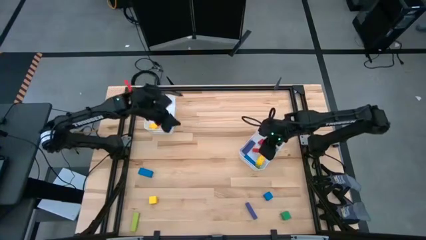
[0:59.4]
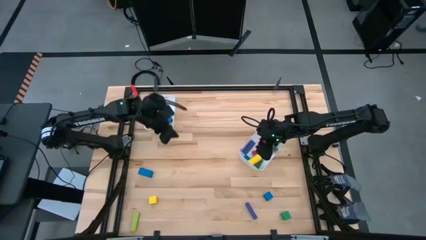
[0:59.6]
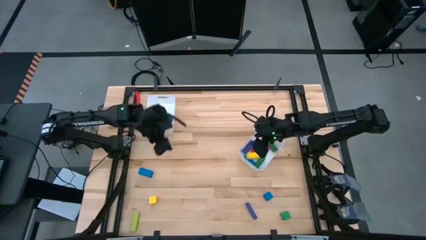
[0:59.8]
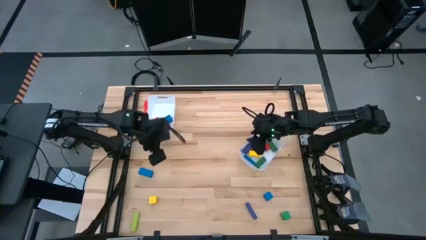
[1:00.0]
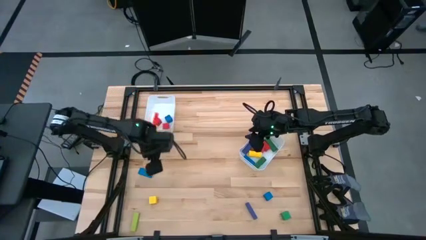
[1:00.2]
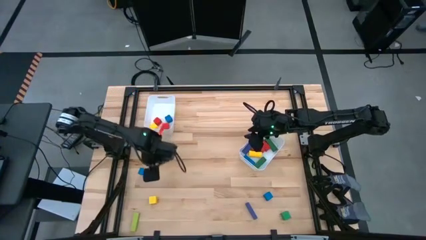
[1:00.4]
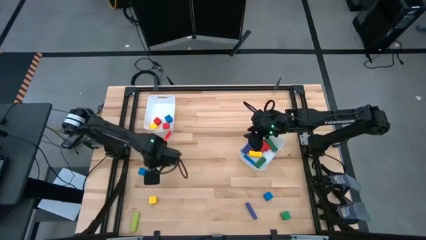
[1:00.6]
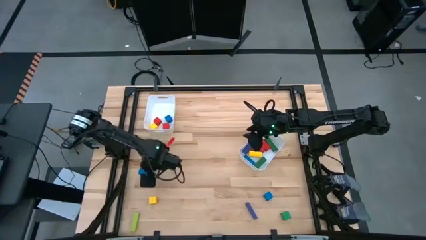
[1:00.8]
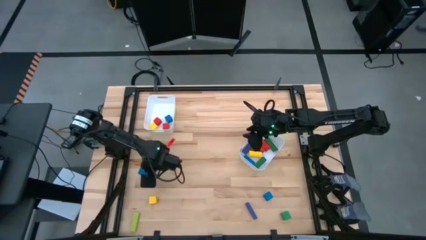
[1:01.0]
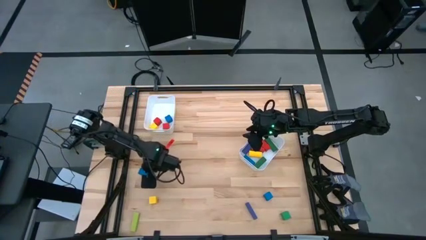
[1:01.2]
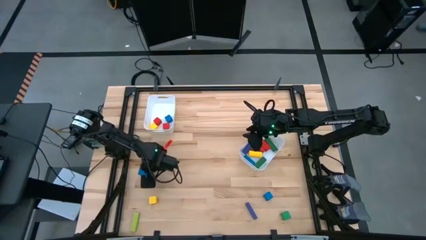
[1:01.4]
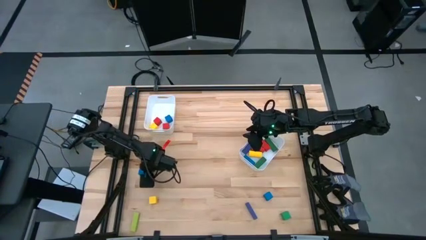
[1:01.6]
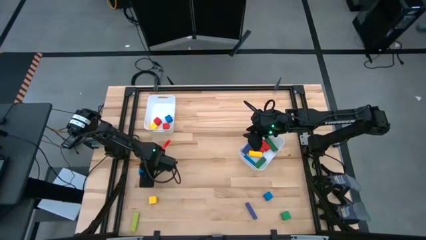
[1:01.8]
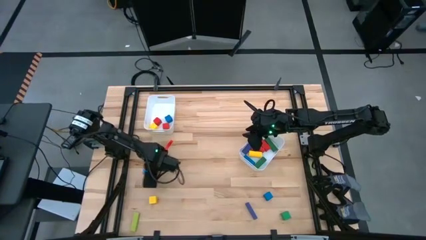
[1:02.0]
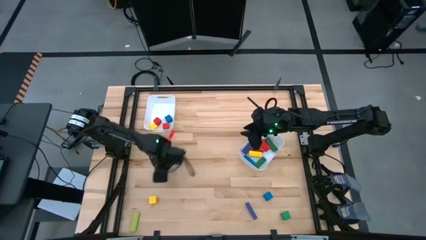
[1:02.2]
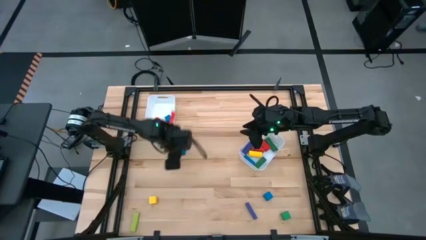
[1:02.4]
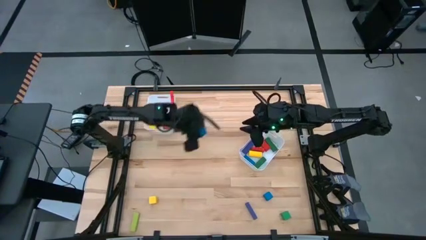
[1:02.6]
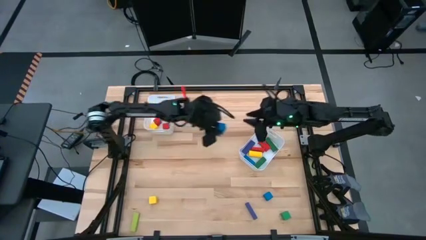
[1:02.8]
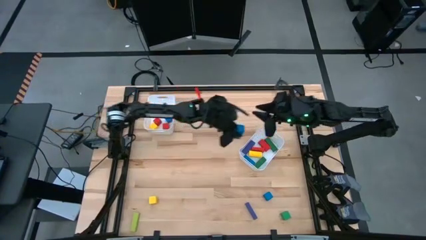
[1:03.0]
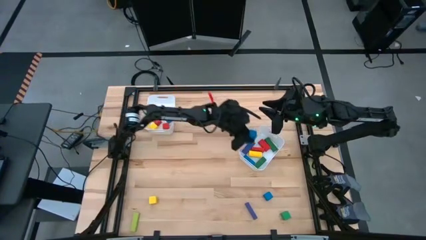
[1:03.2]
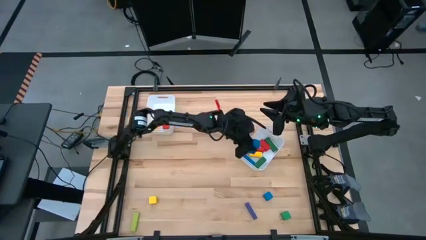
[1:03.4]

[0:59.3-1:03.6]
Task: Sort blocks by size
Put the blue rectangle block into the right white bin

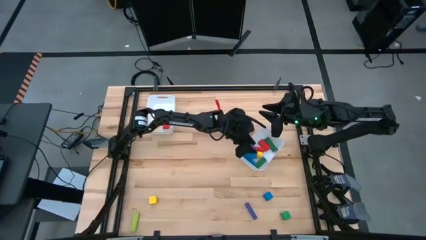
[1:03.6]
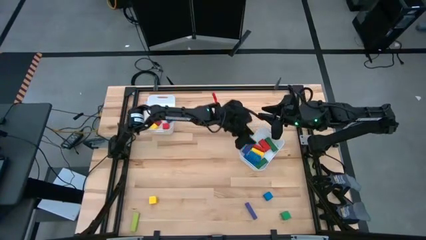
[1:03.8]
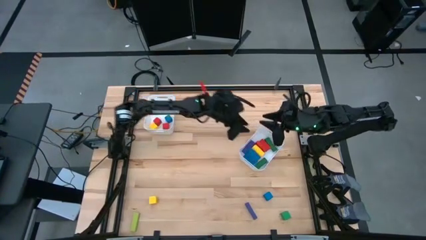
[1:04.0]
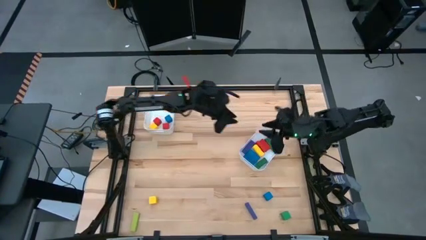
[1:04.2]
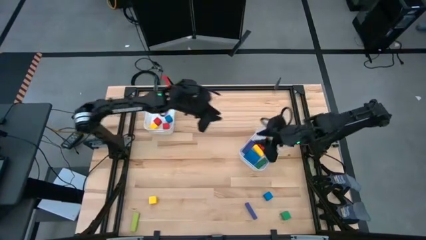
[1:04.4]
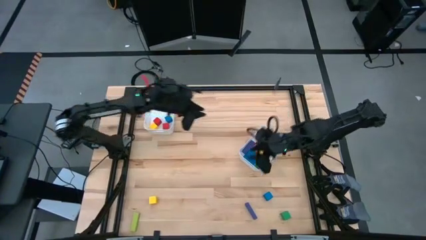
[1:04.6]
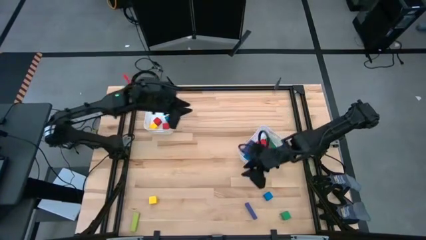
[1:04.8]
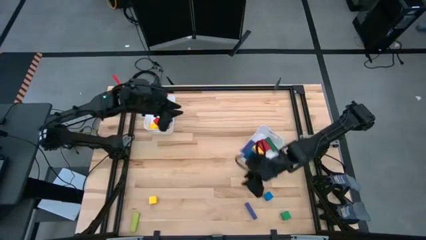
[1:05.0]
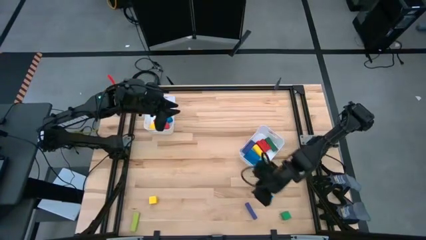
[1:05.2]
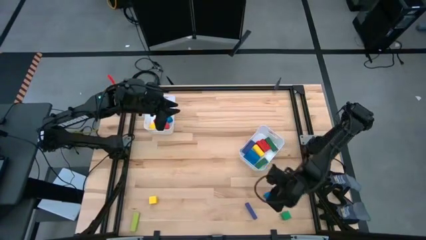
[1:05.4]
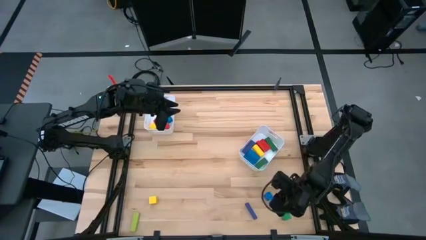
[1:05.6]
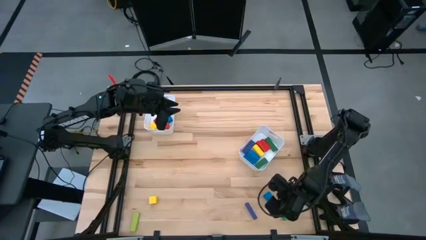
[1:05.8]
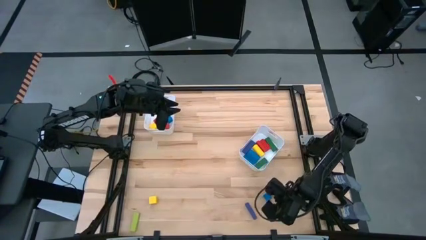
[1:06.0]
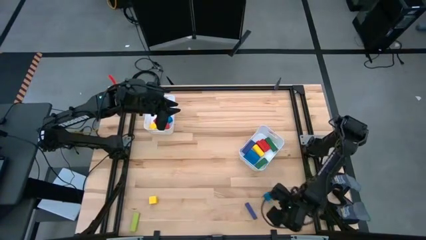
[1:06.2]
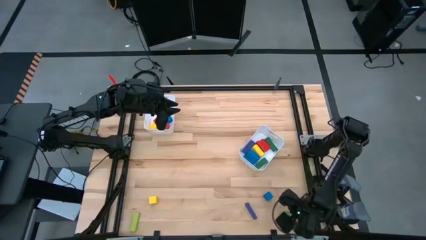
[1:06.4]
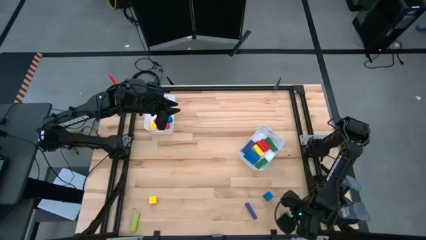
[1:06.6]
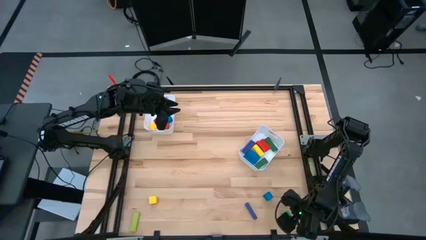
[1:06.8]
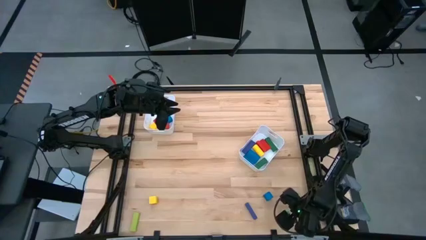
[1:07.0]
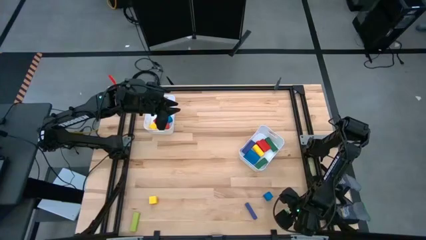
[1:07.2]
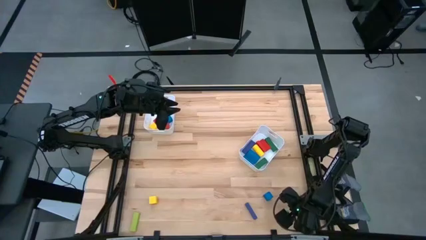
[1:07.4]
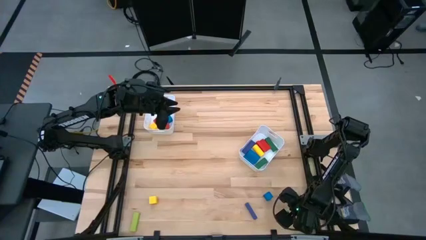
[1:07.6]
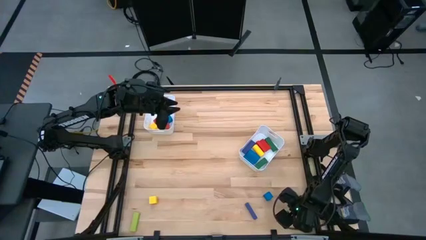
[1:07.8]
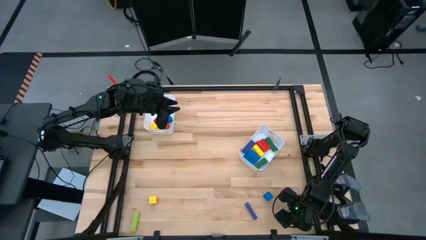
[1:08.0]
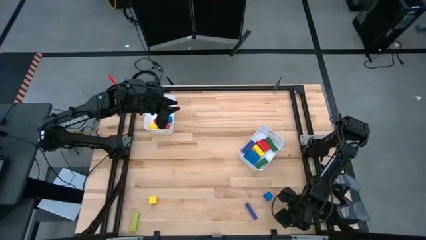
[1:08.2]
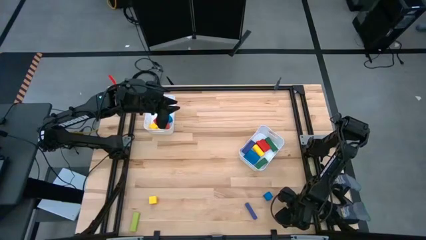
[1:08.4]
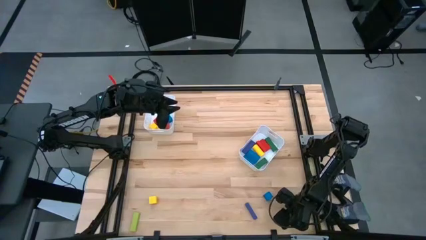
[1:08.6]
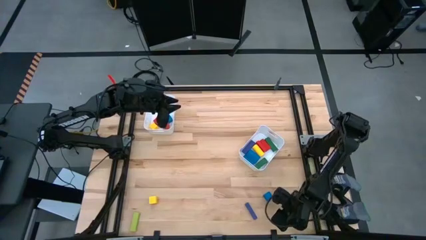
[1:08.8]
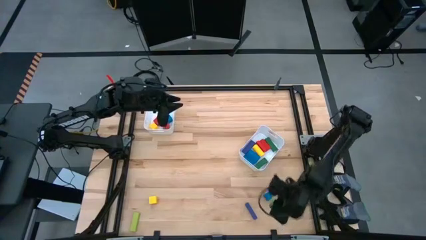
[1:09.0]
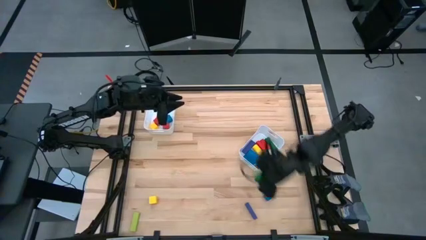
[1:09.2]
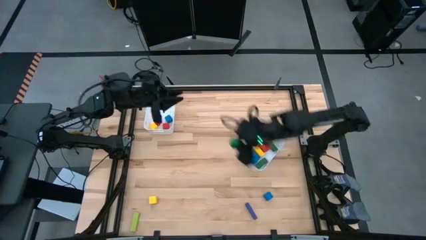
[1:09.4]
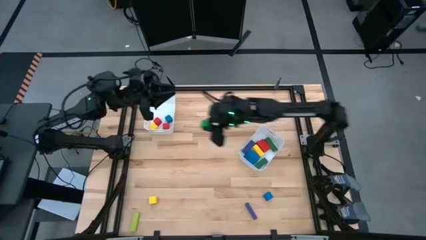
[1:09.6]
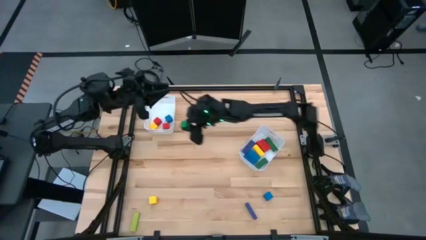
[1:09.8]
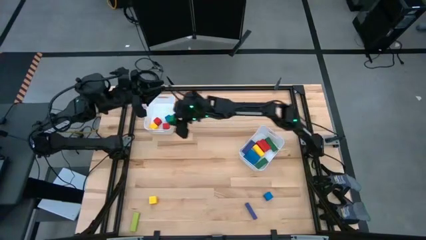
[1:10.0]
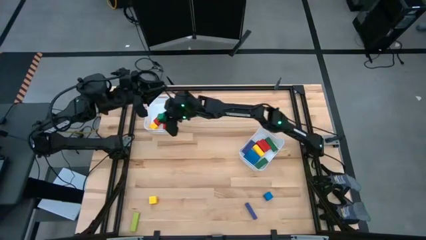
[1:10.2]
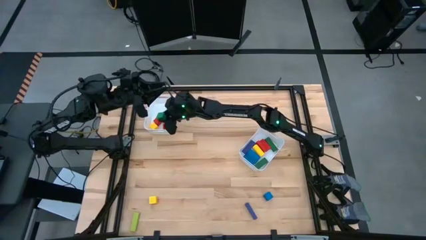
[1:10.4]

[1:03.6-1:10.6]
Put the green square block into the left white bin

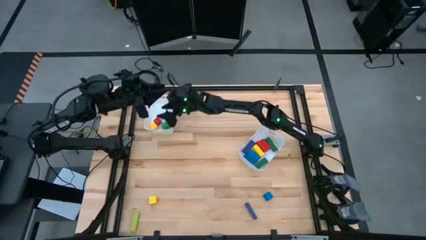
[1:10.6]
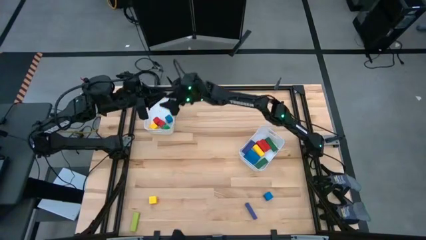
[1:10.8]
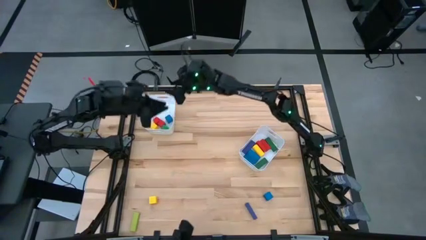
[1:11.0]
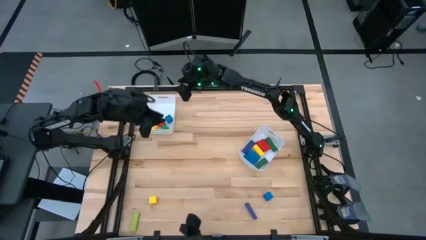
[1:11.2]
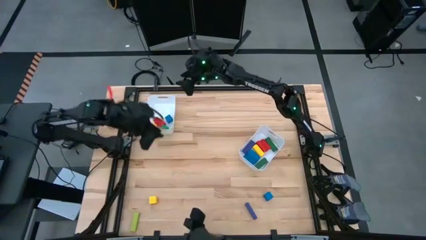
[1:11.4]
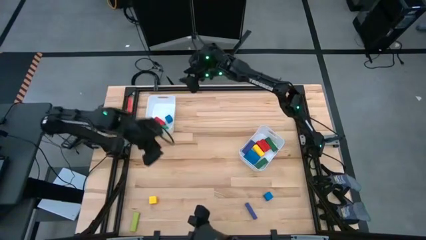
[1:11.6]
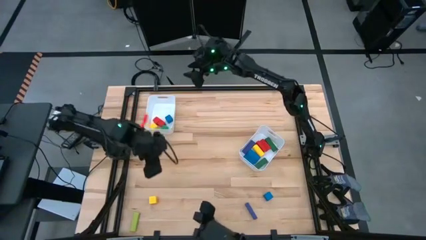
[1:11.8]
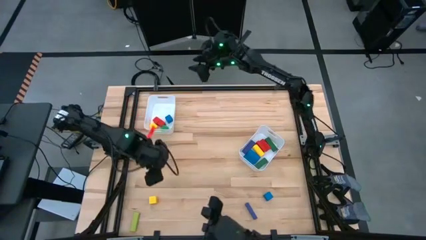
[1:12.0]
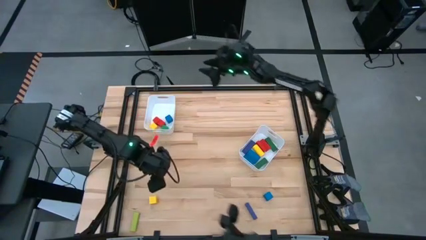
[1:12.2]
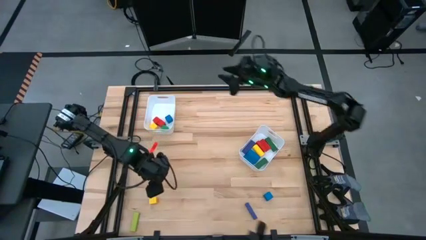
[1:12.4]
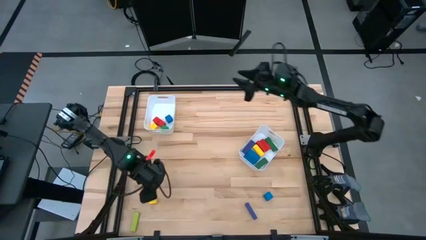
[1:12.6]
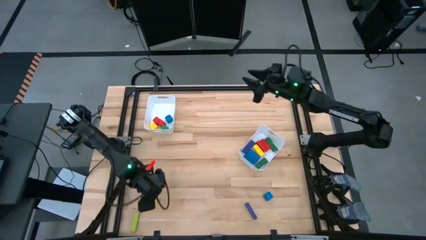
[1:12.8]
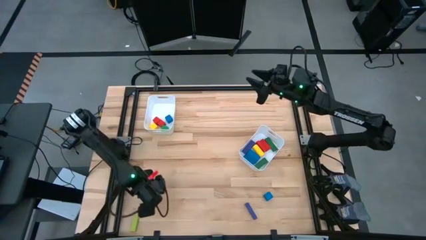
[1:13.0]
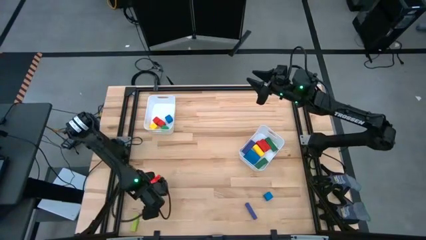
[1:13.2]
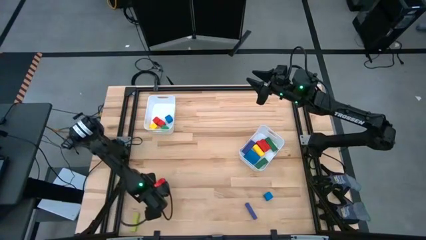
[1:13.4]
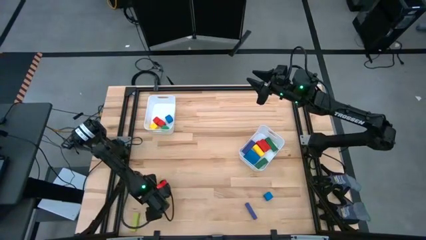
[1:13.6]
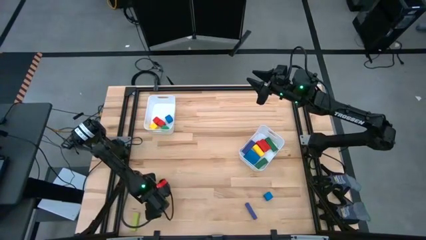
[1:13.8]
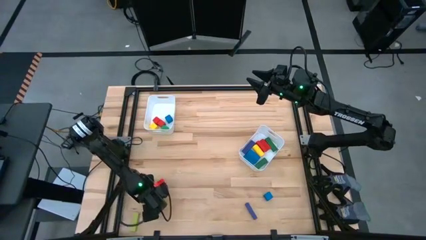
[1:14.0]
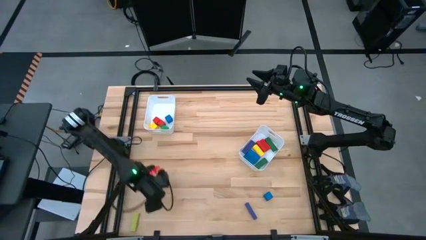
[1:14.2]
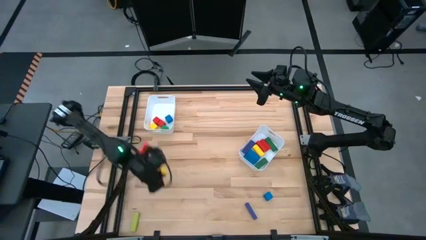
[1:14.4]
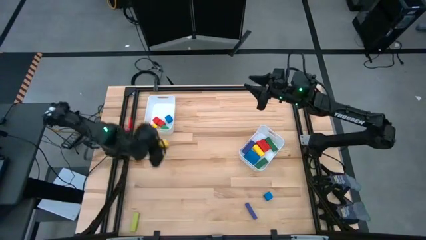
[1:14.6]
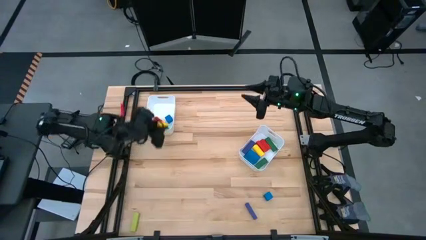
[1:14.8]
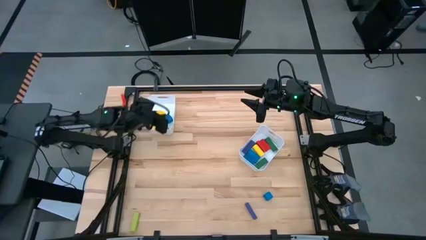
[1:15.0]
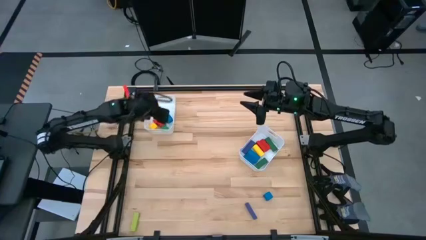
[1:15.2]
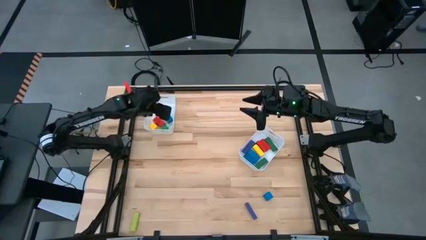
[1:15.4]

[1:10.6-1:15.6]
Put the yellow square block into the left white bin

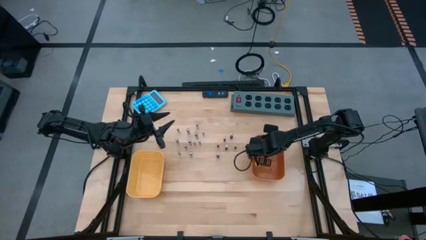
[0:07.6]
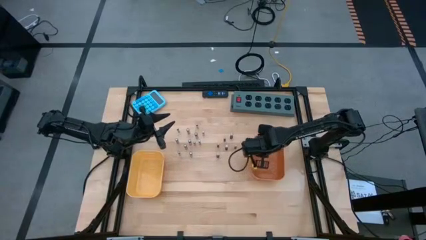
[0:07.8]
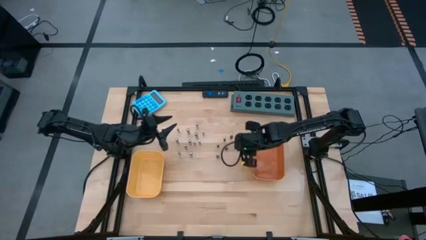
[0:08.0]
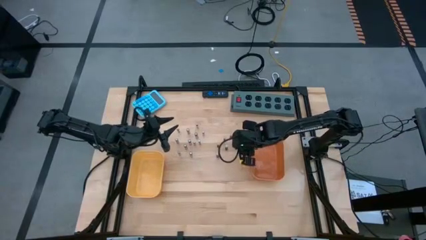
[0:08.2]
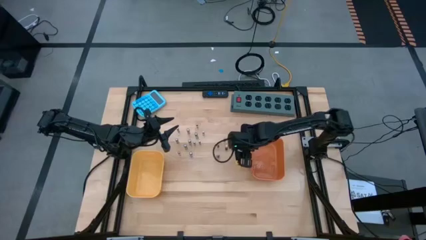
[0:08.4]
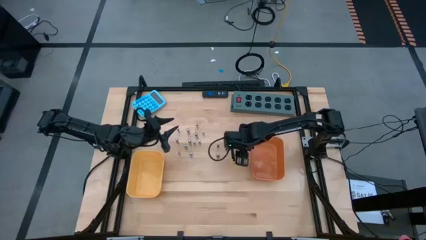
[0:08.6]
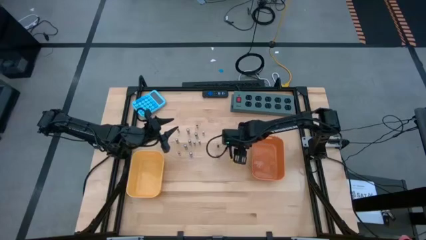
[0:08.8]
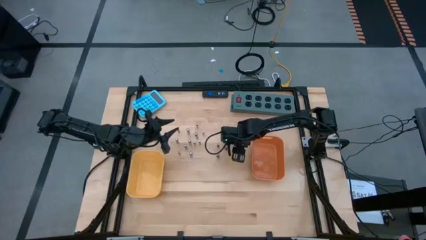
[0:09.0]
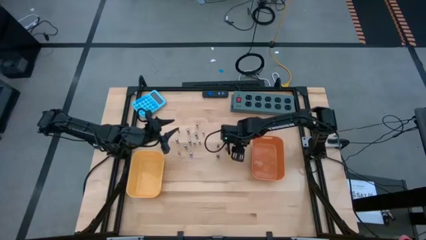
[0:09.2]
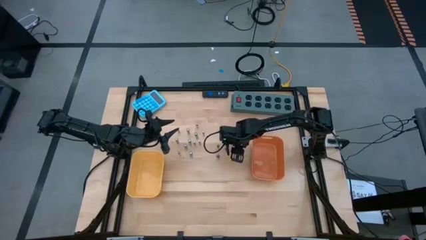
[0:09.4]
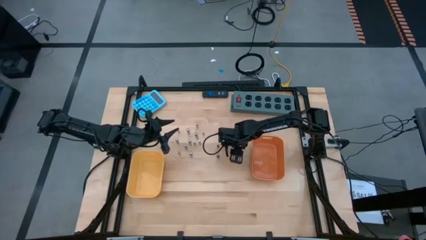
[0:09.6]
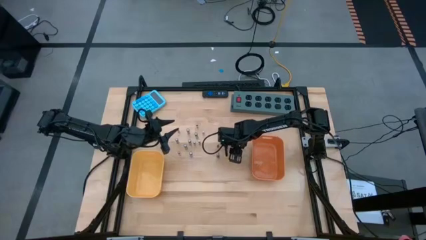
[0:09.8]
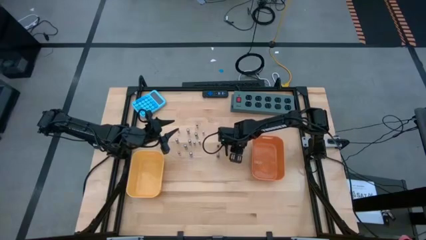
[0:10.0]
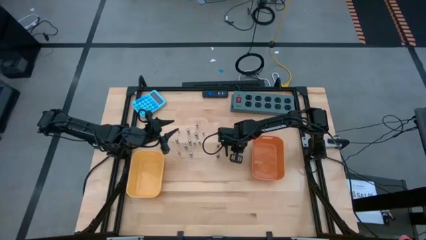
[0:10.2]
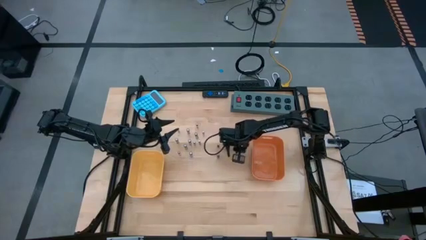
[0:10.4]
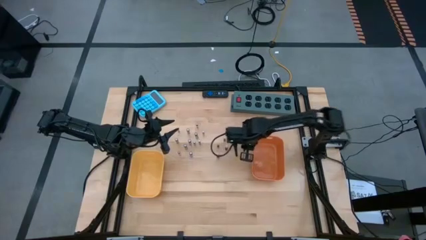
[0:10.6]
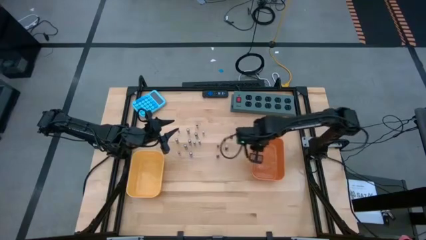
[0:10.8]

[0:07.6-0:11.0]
Task: Sort batteries
Put the brown battery into the orange bin
